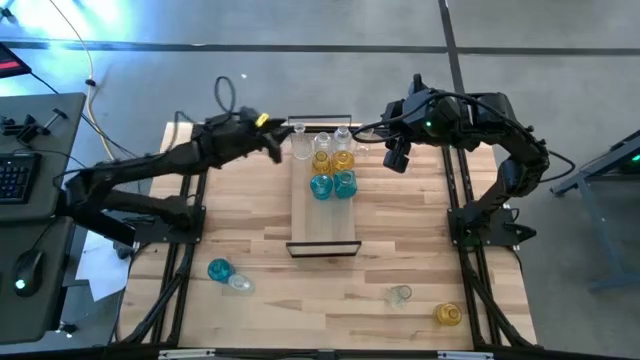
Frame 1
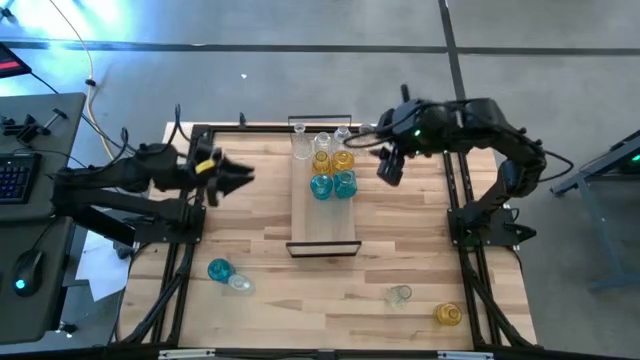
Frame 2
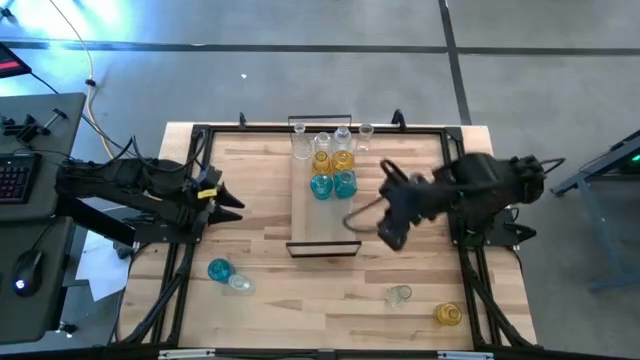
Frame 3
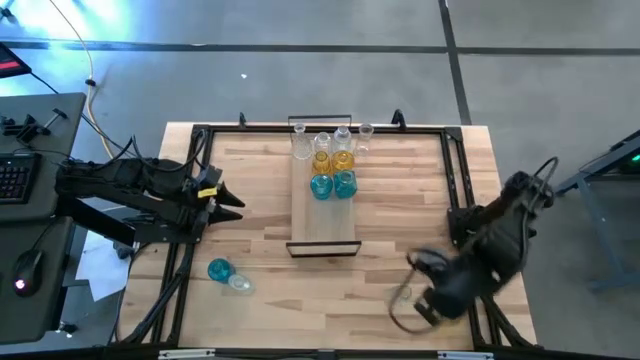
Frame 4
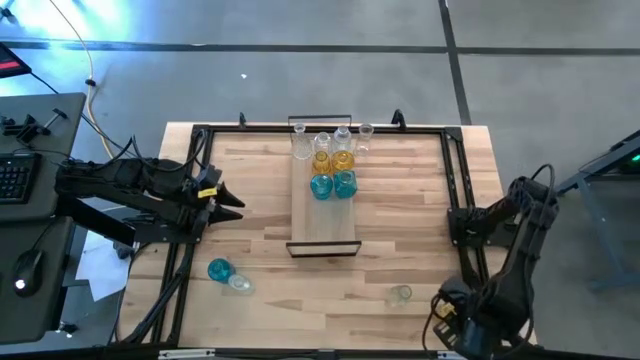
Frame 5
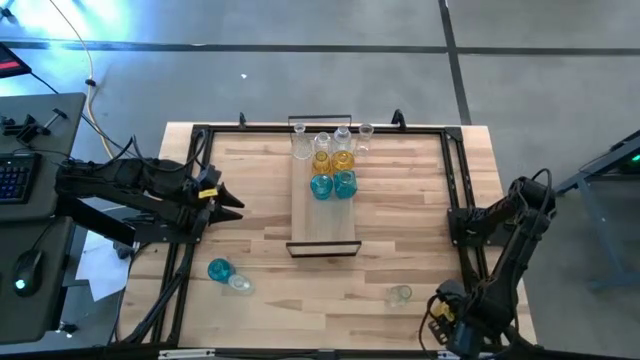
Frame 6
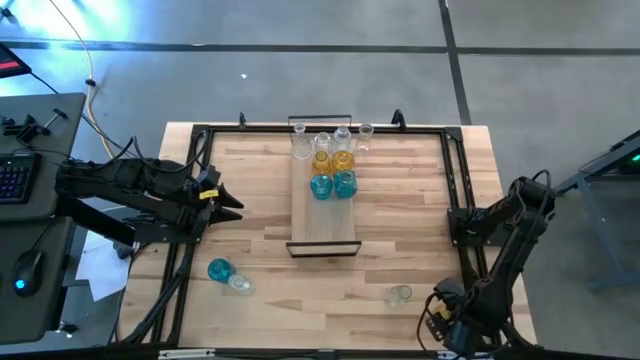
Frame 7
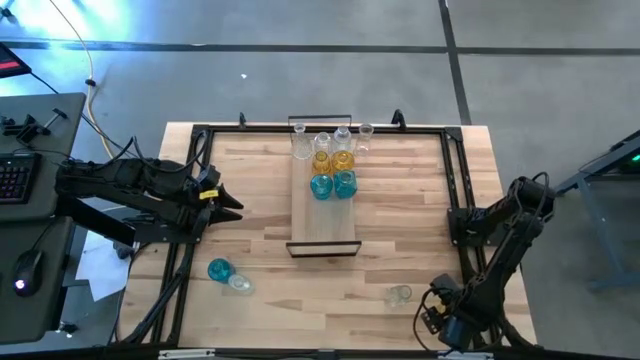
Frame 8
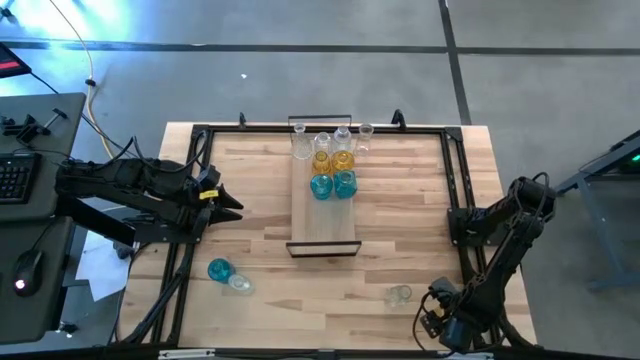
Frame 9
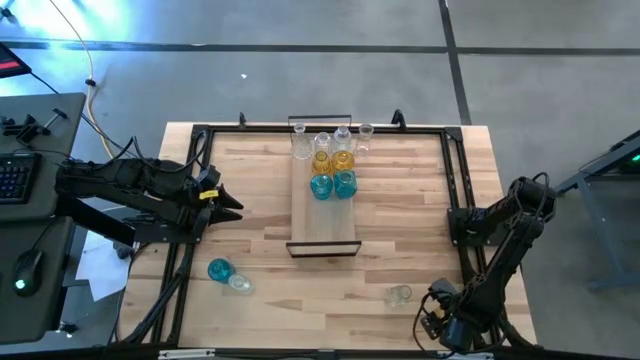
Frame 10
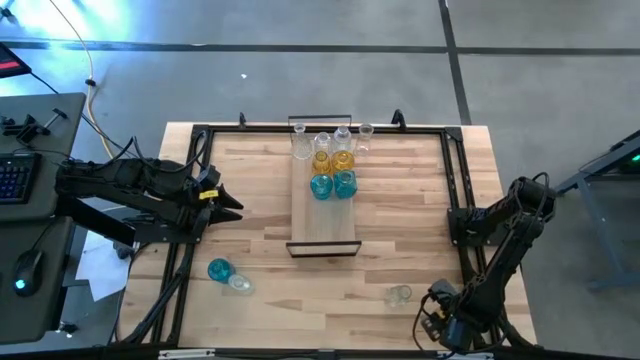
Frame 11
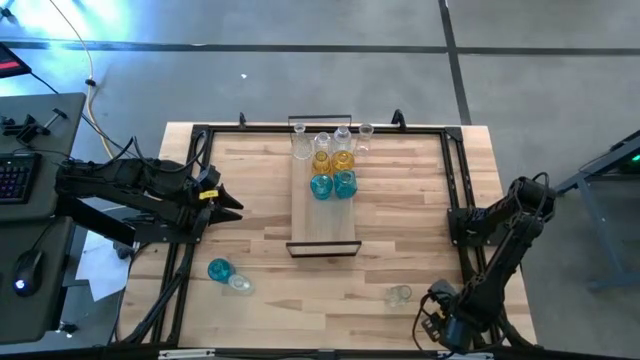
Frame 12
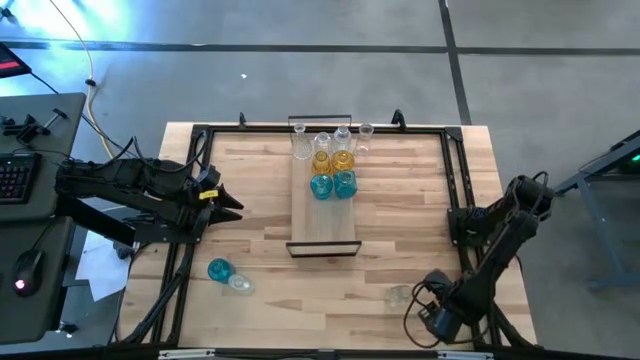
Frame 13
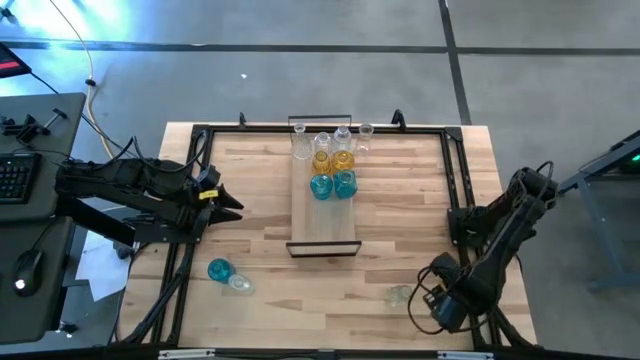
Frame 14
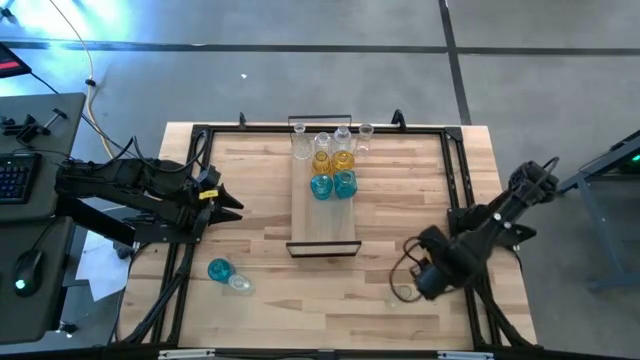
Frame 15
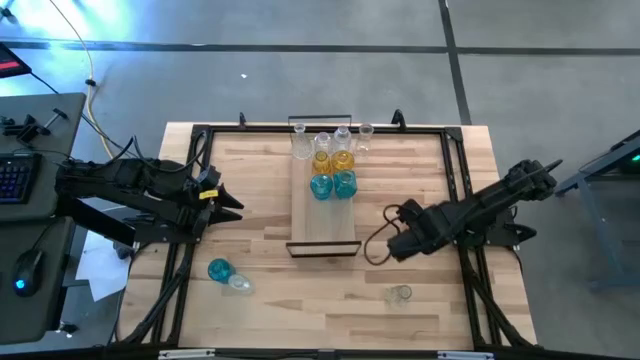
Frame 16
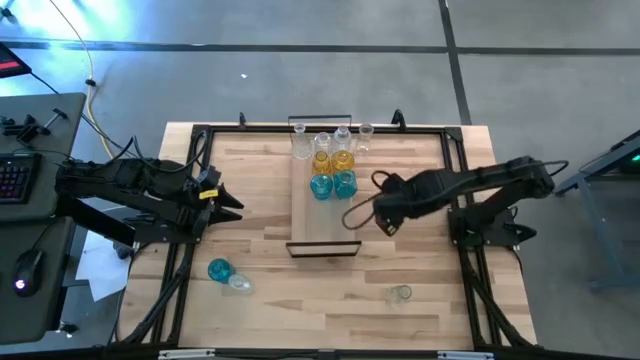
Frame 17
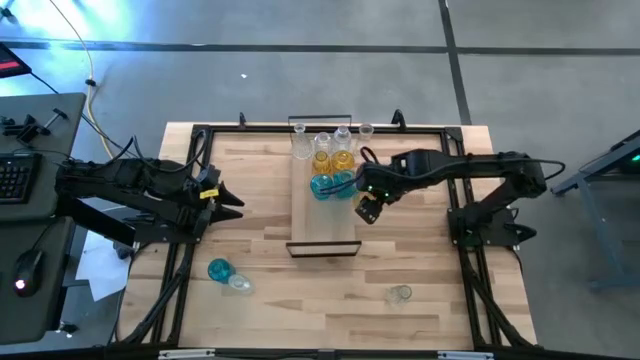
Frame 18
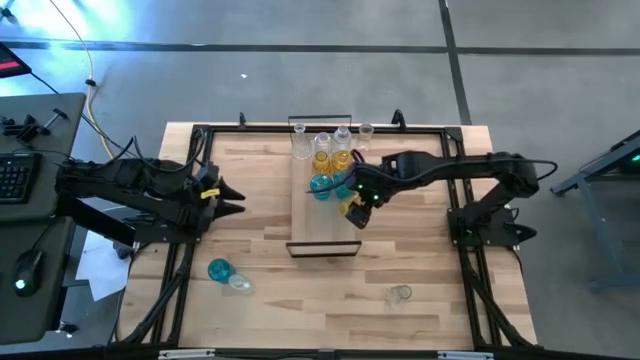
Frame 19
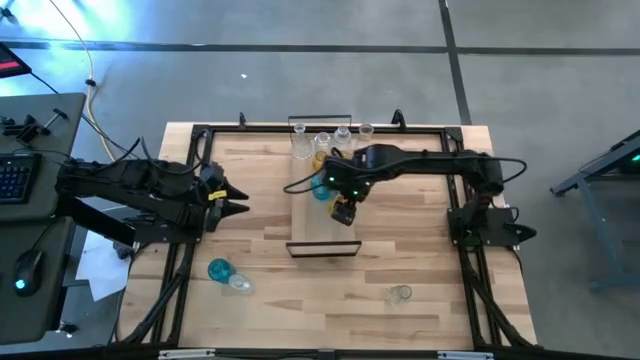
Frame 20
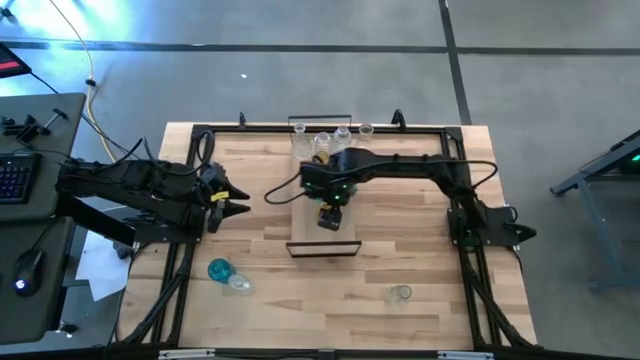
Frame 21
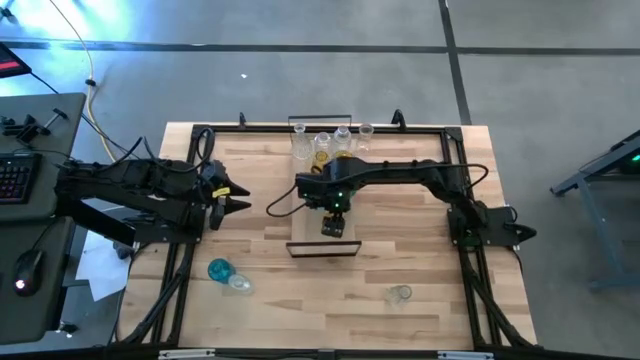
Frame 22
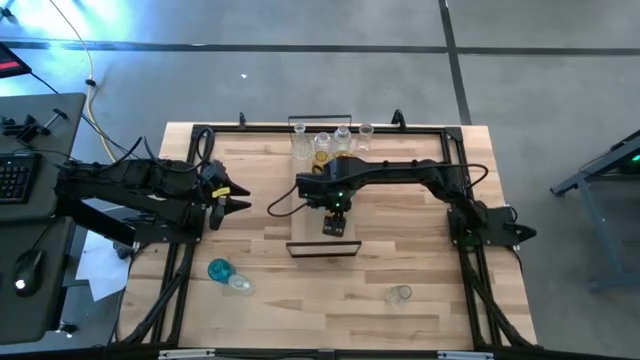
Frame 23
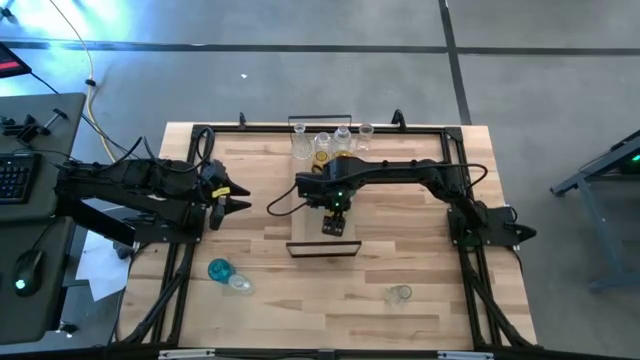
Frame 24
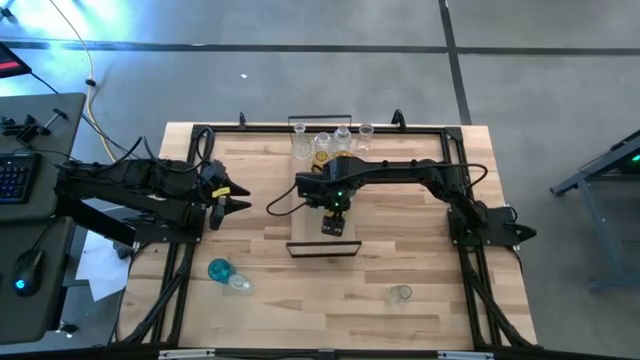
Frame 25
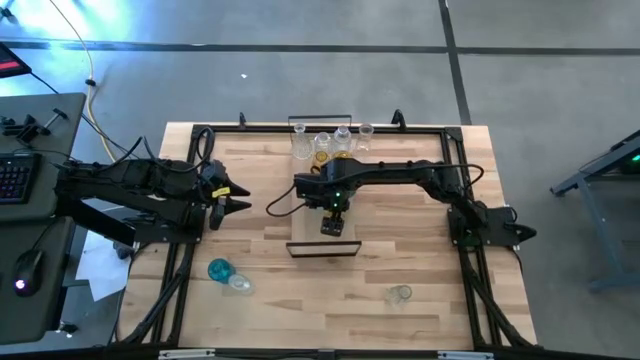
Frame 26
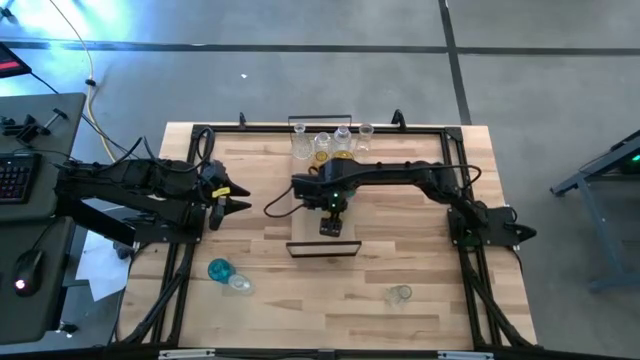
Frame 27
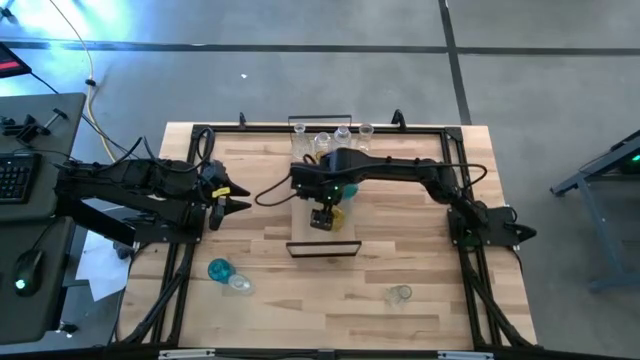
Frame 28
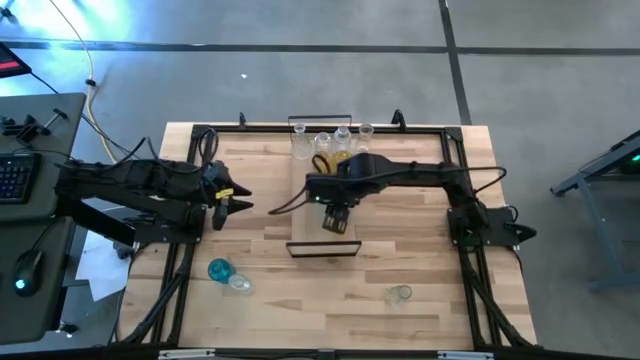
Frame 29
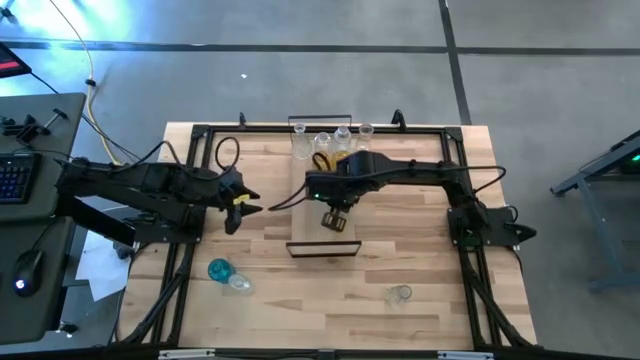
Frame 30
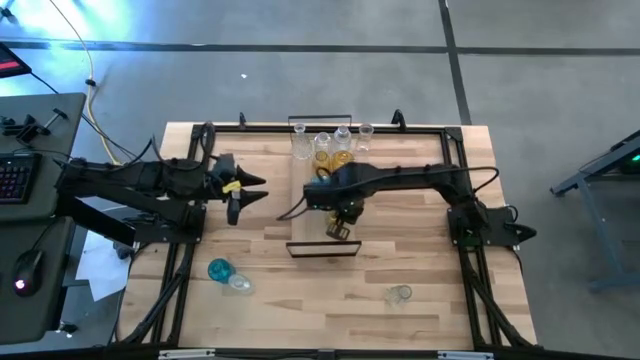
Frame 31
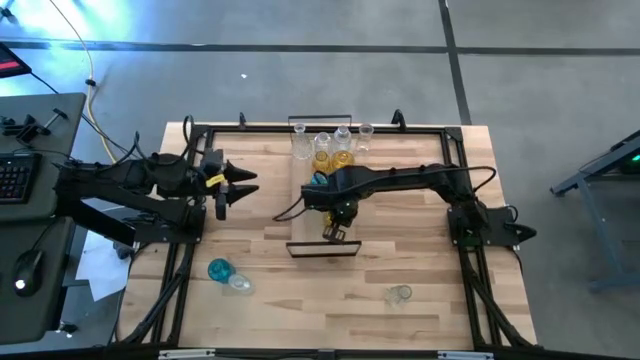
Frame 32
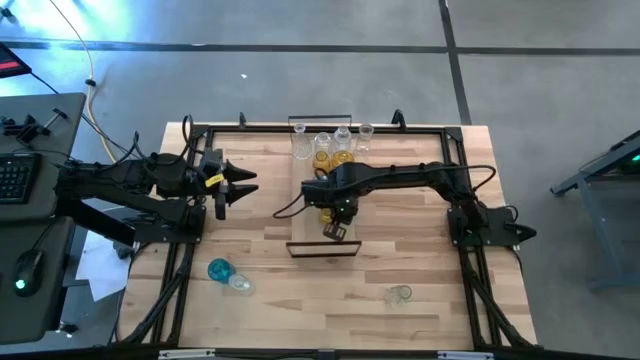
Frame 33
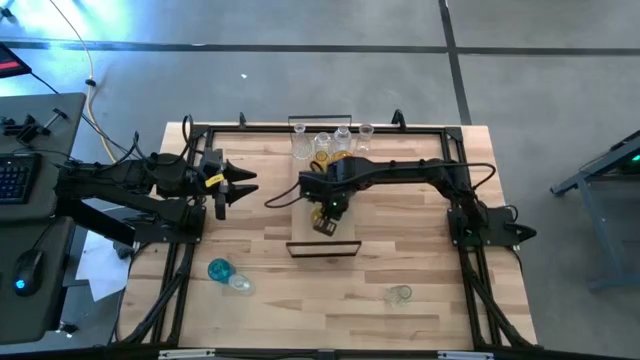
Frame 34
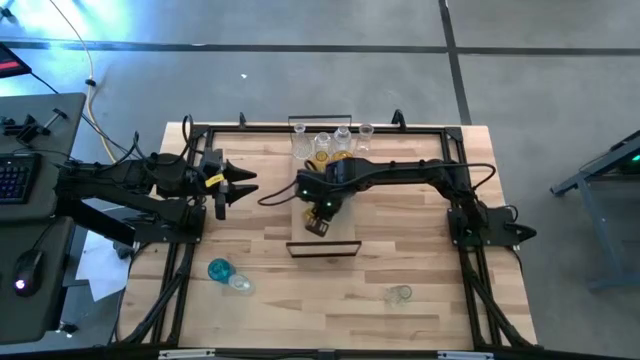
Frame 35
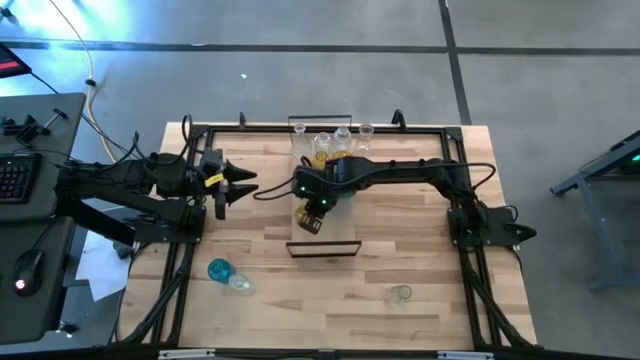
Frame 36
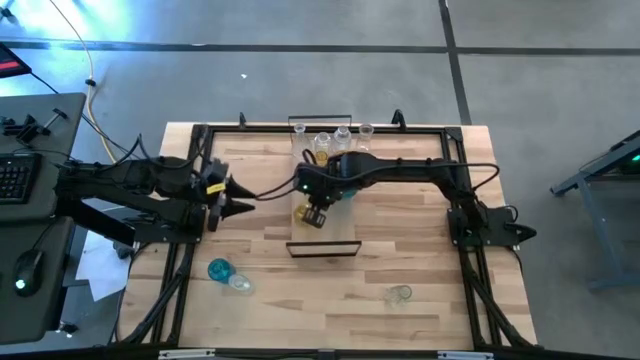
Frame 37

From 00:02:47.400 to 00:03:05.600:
Task: sort vases onto shelf
Put the yellow flower vase on the bottom of the shelf

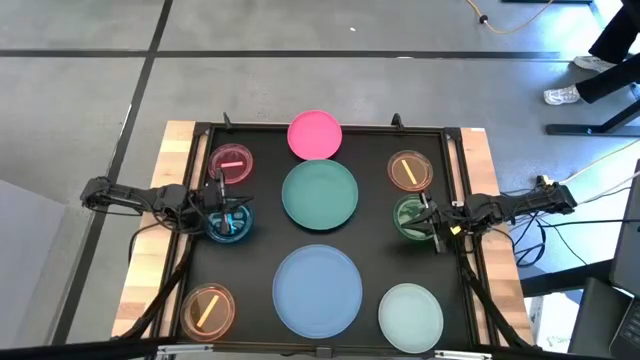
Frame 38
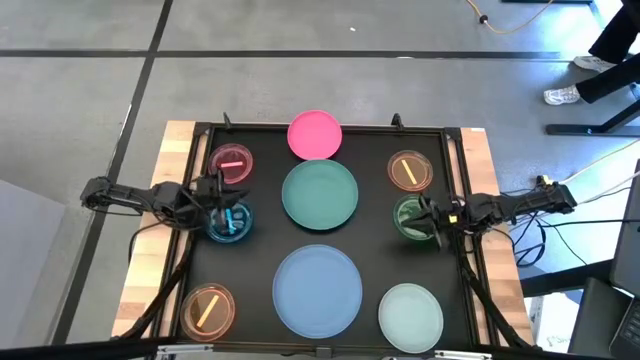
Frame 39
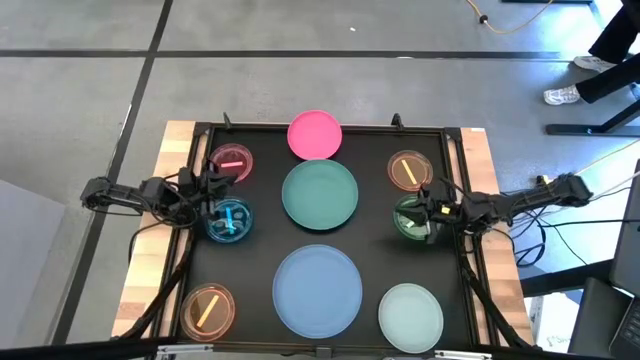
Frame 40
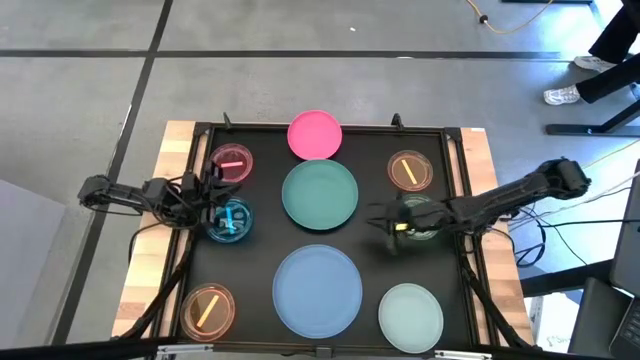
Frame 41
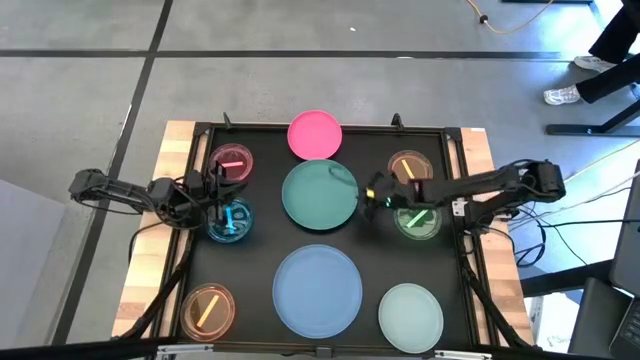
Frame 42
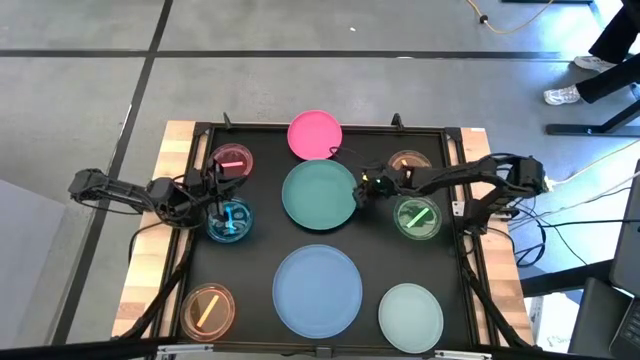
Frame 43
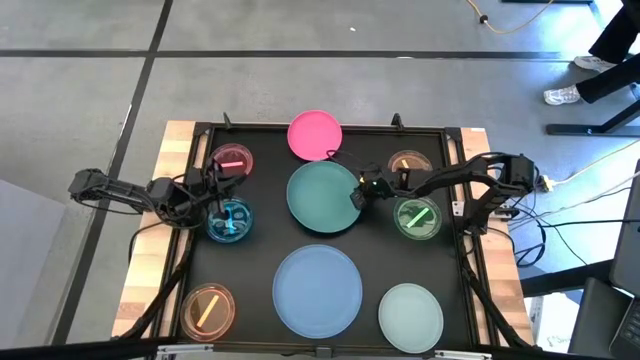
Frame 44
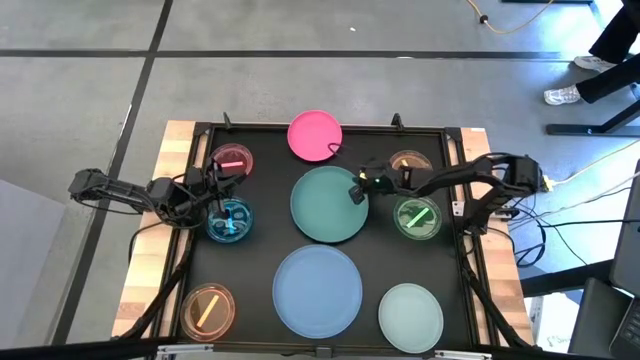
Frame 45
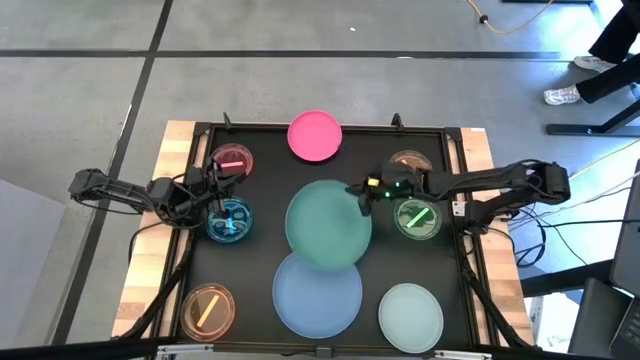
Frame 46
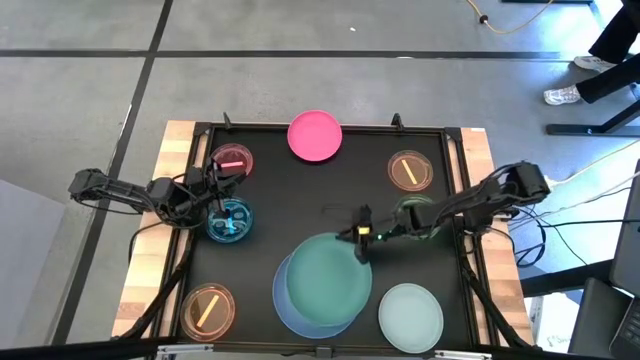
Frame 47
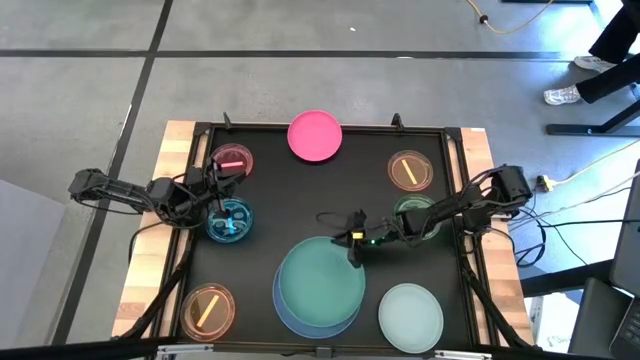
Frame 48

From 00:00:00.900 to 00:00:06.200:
Task: Stack plastic plates
Stack the dark green plate on top of the blue plate
